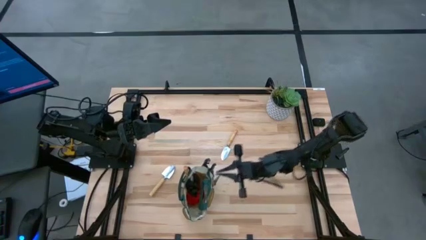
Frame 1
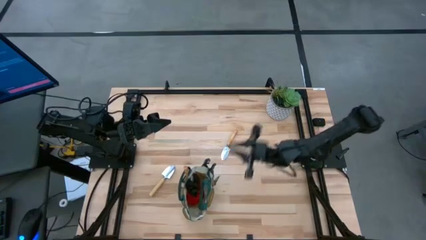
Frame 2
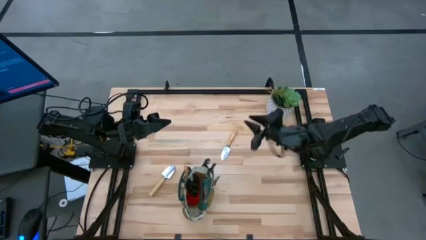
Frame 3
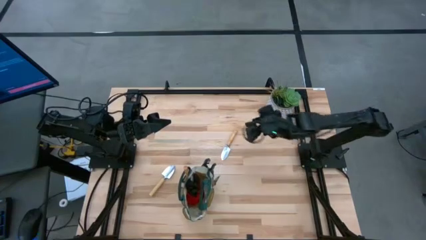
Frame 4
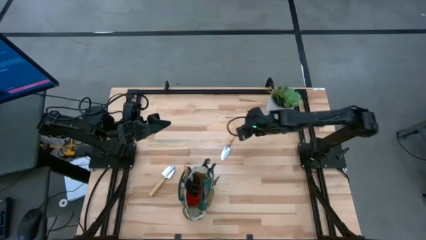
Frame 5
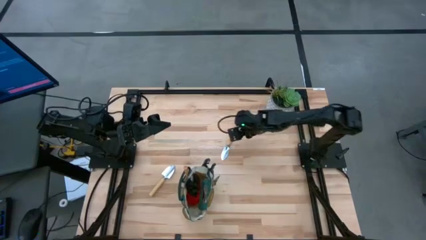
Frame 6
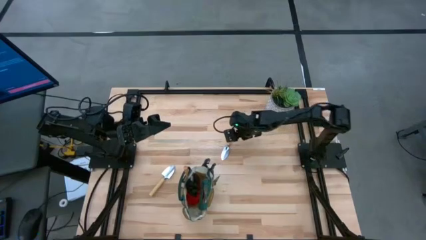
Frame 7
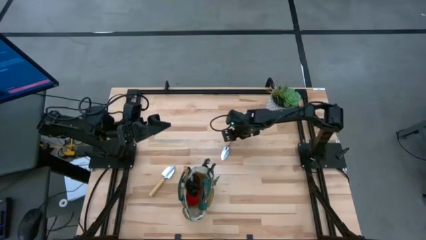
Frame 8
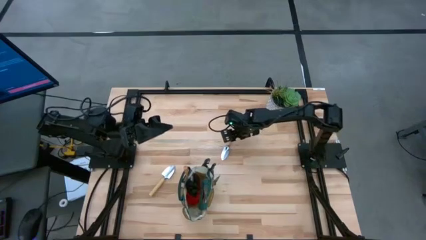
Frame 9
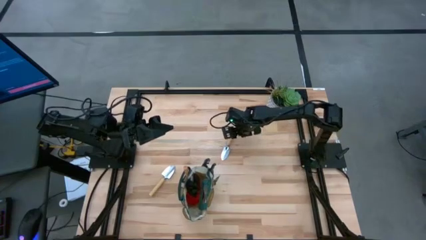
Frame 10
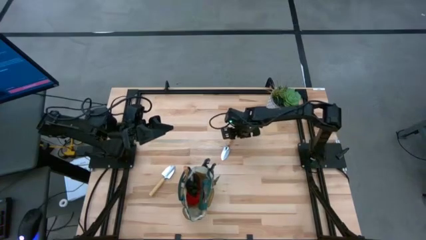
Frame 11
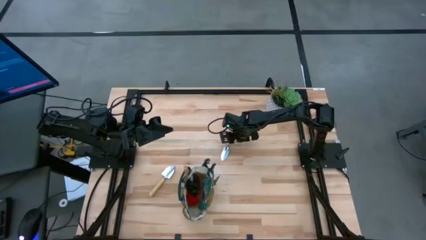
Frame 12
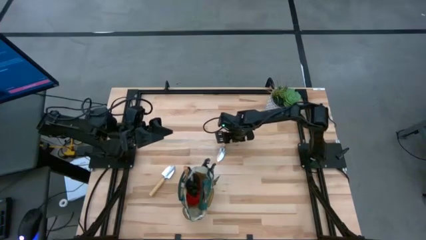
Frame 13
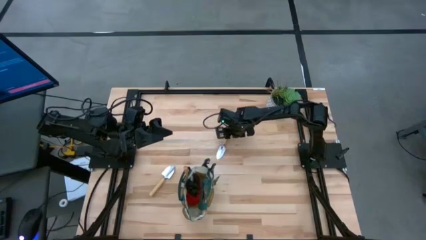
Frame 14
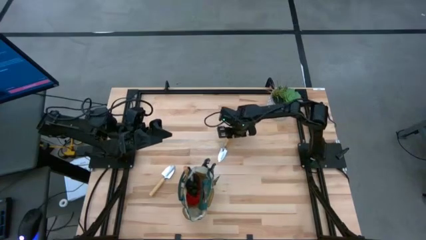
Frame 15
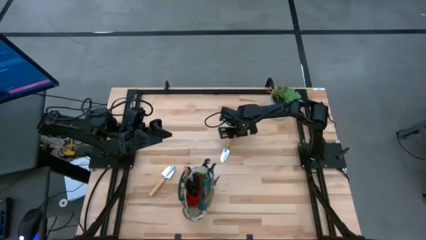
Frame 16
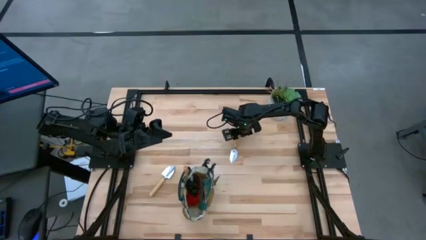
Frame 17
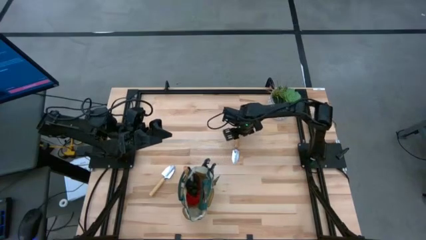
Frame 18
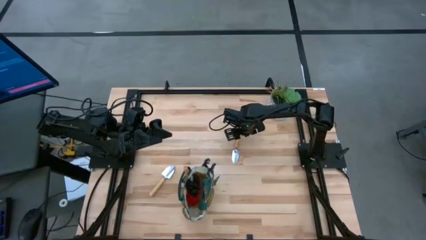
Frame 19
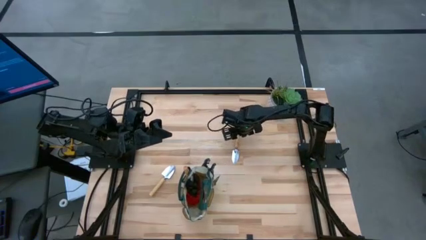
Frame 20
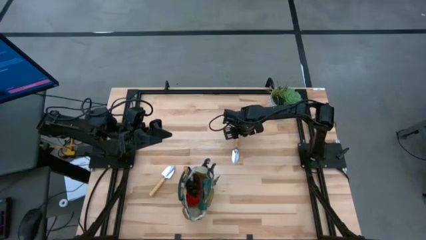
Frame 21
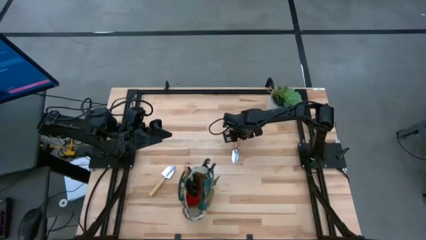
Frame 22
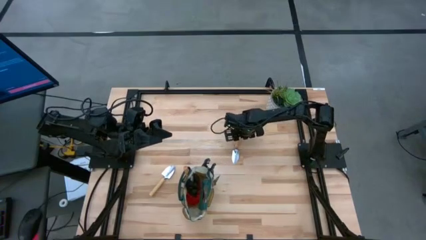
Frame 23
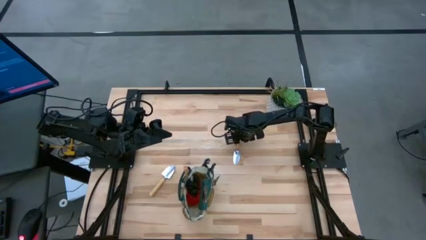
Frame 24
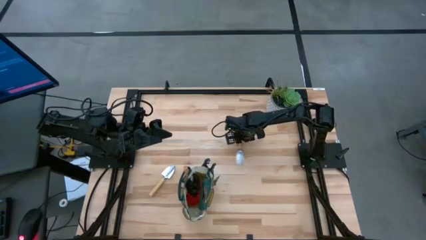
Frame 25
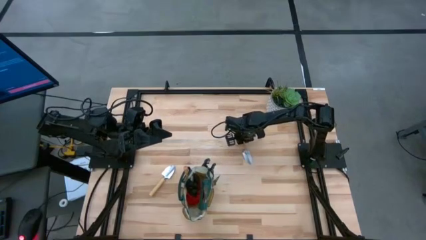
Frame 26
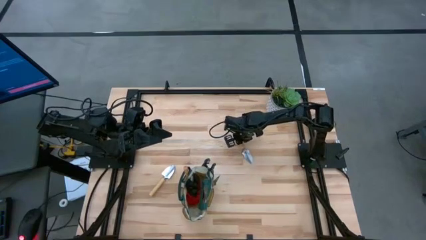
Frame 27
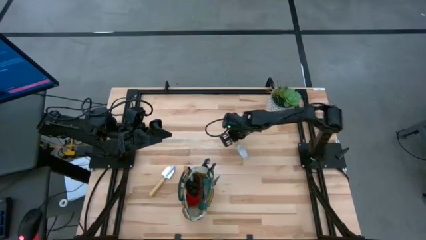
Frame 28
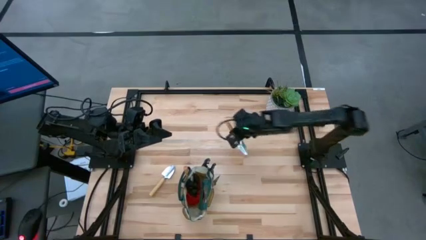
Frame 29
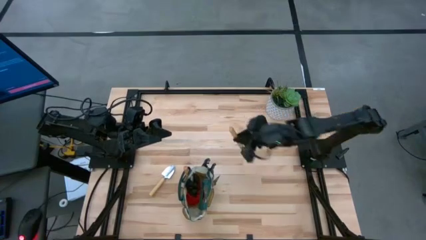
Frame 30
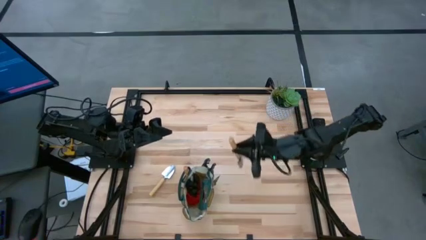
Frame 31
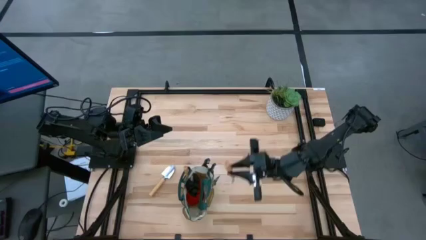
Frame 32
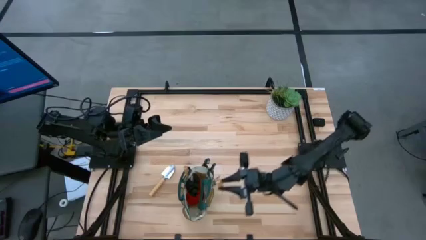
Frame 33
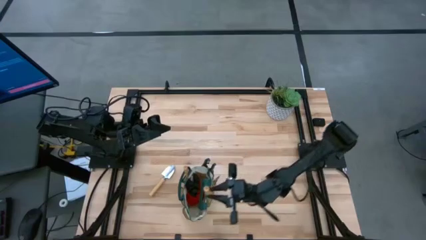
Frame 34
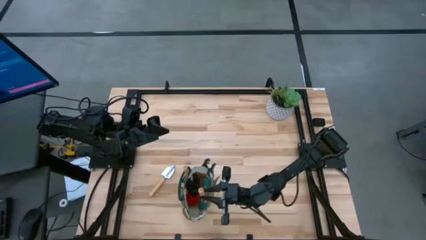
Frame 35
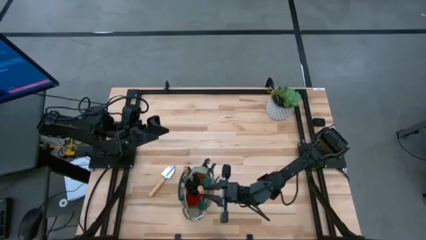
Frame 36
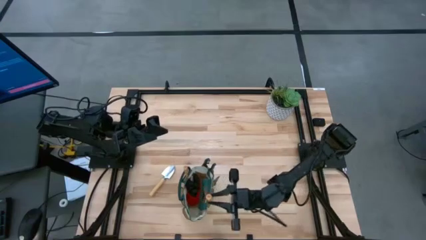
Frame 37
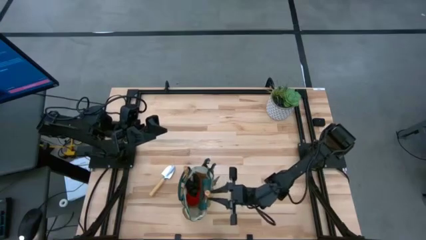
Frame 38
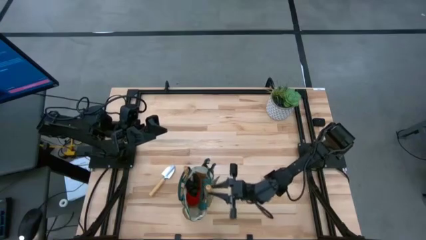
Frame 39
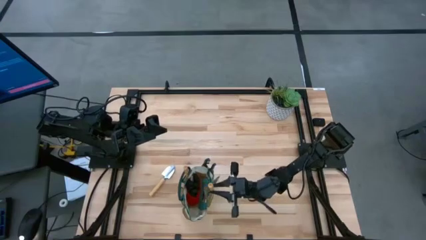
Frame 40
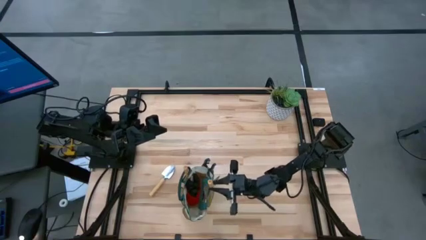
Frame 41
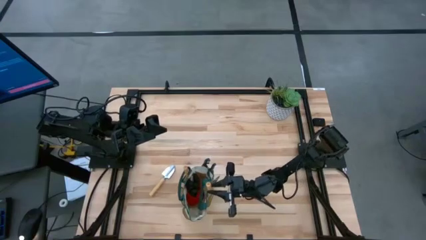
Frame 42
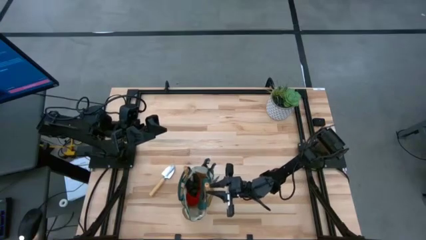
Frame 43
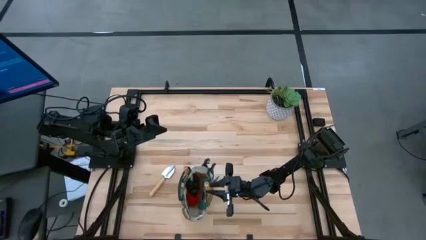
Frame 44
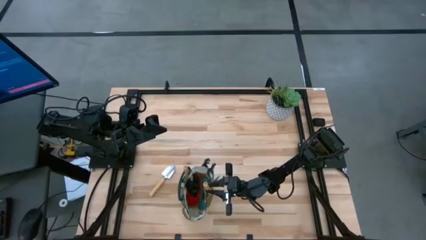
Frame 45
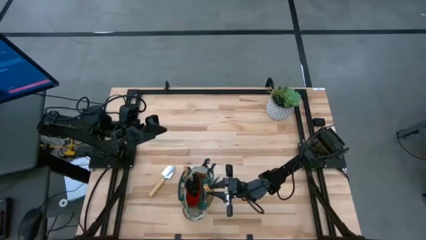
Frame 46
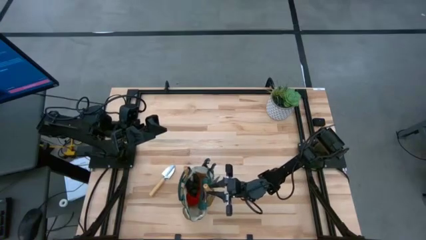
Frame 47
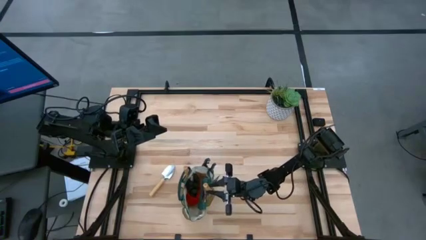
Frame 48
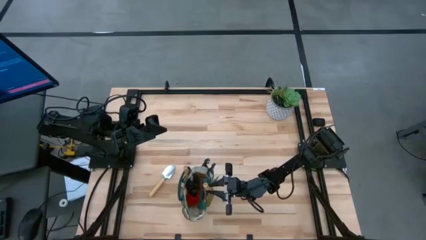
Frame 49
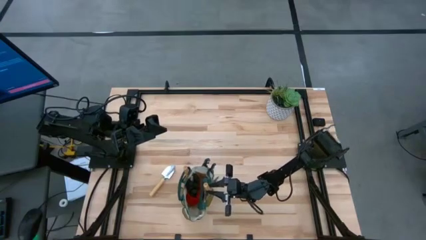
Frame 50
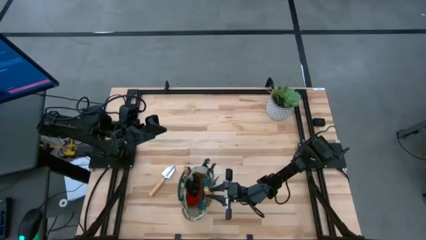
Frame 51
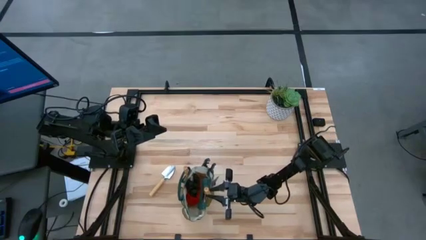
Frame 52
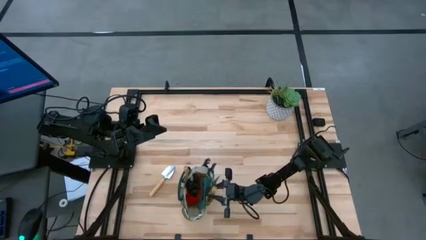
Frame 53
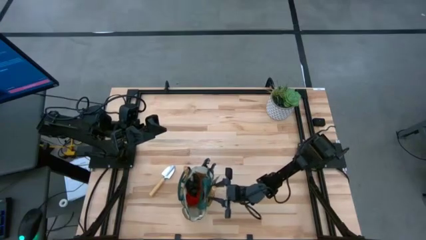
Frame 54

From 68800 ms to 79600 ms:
Task: Pick & Place Garden tools in Gardening bag
Put the brown trowel into the gardening bag
